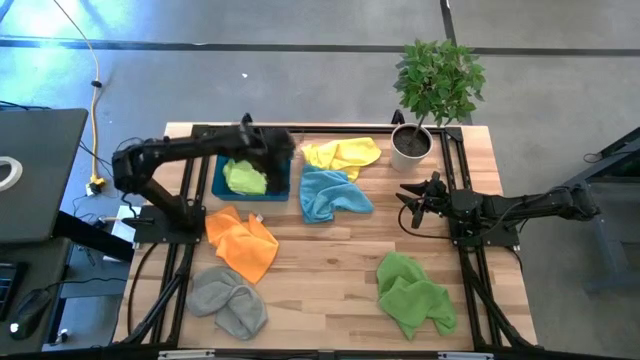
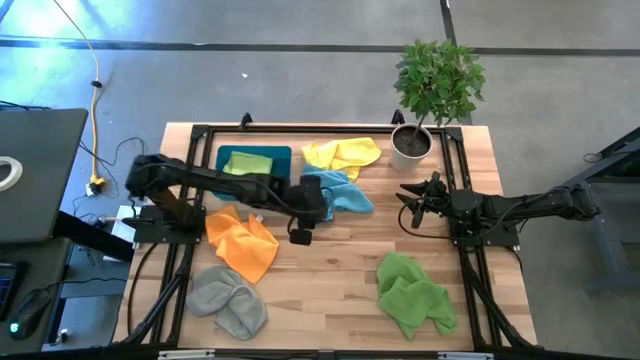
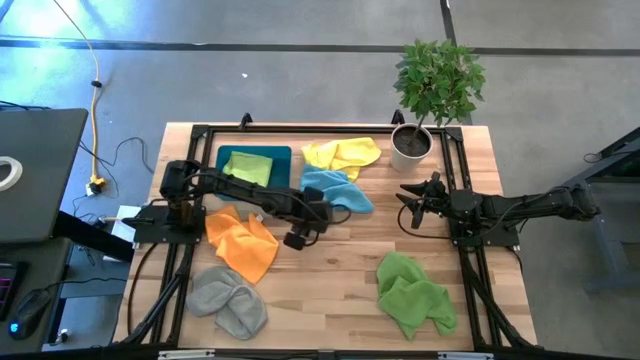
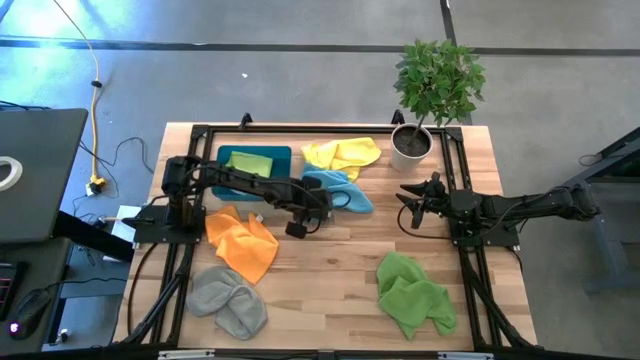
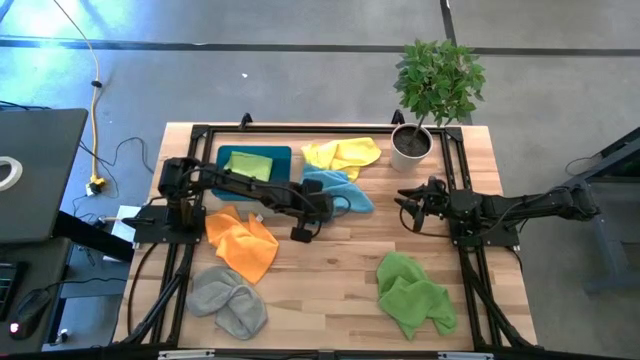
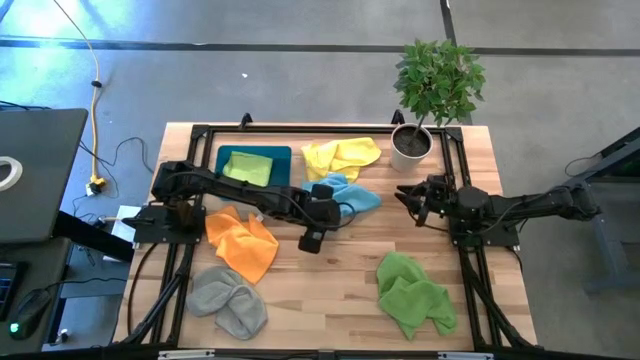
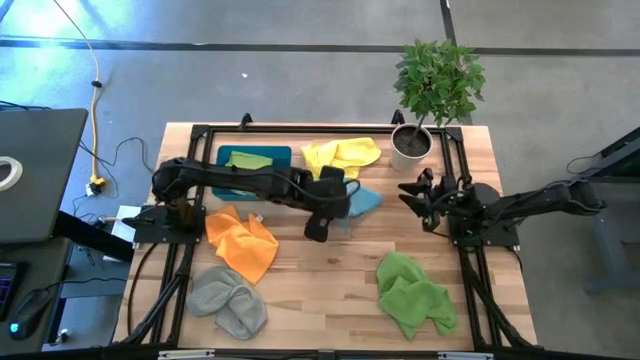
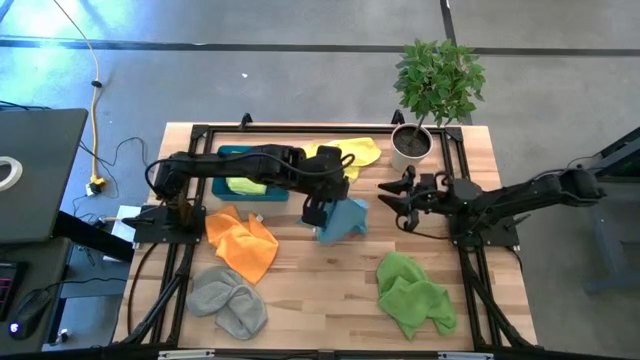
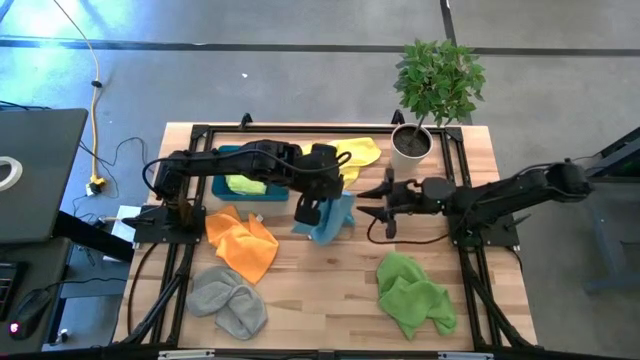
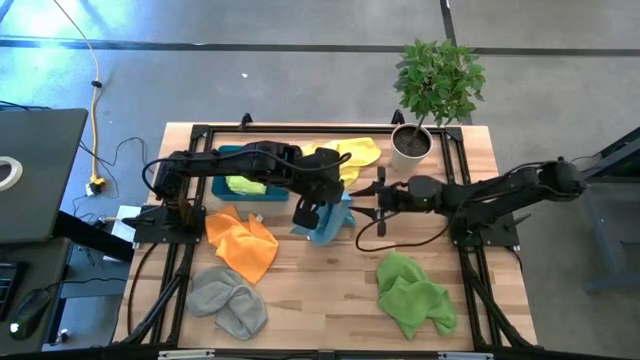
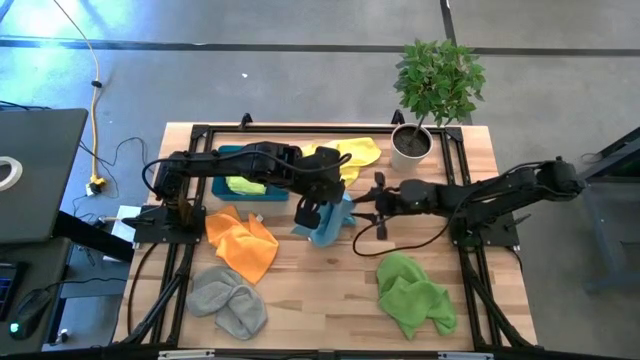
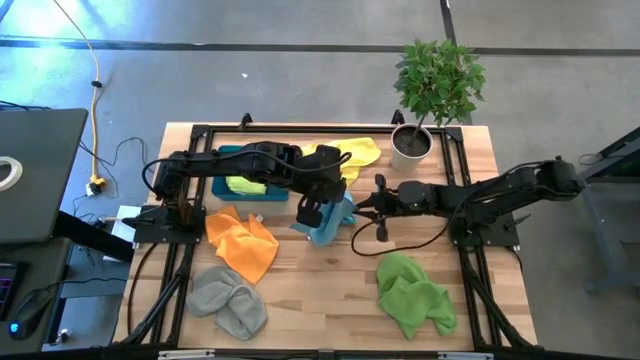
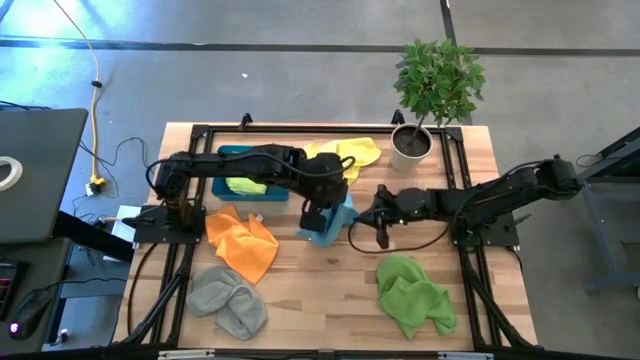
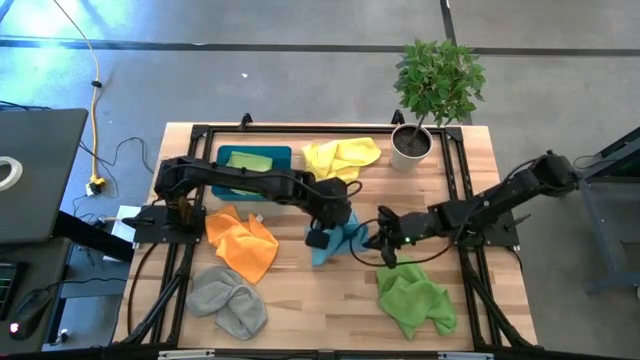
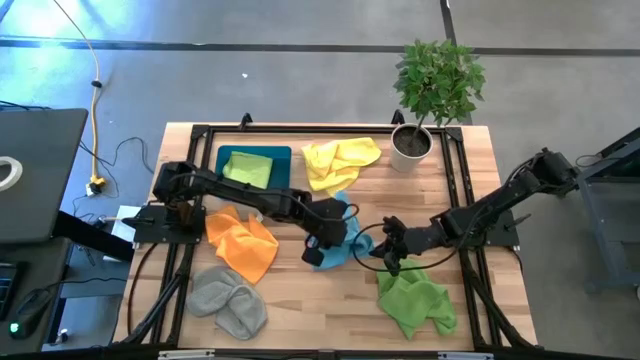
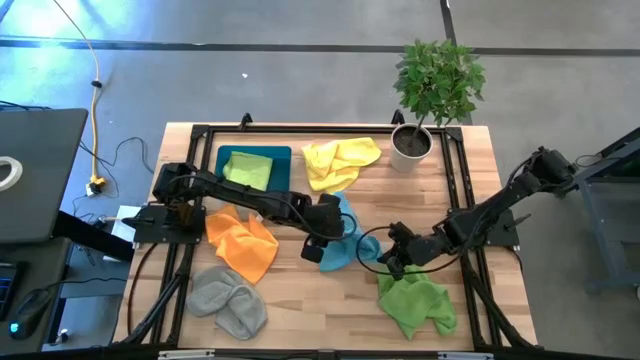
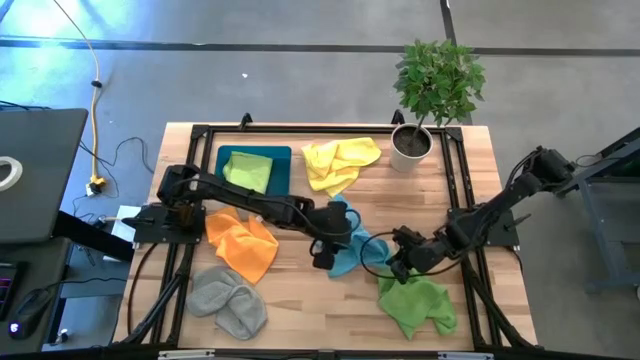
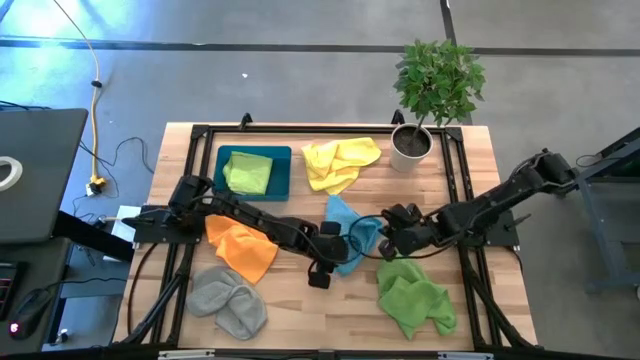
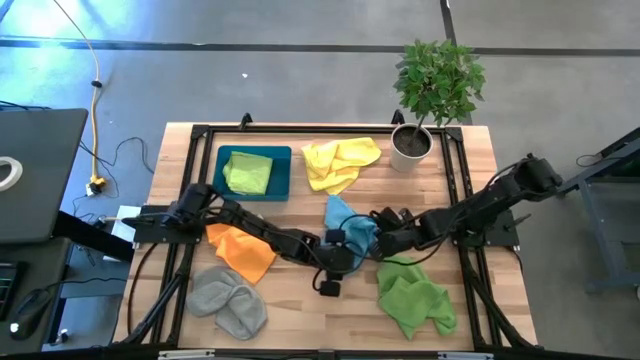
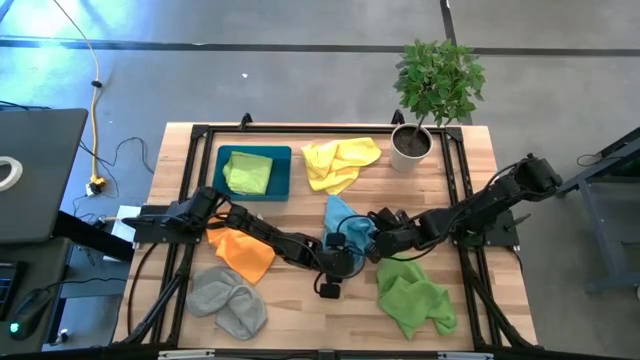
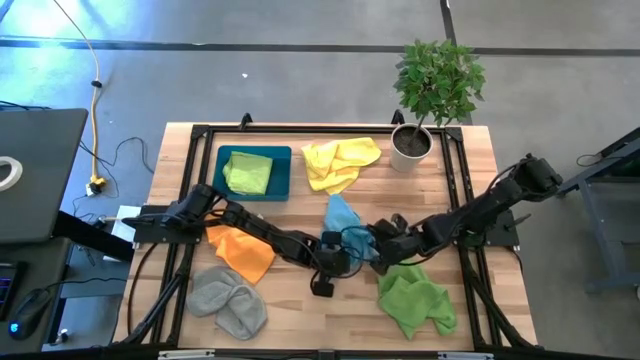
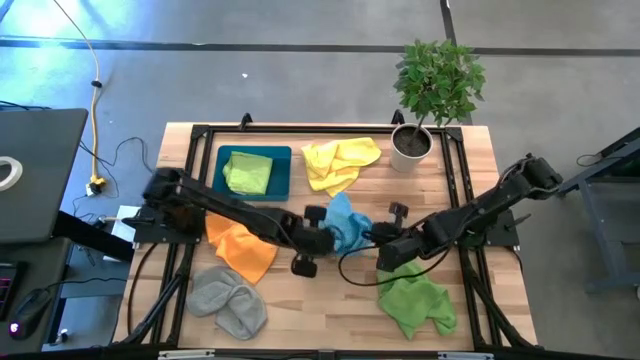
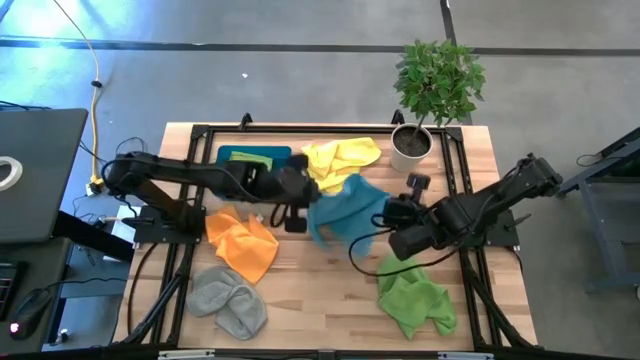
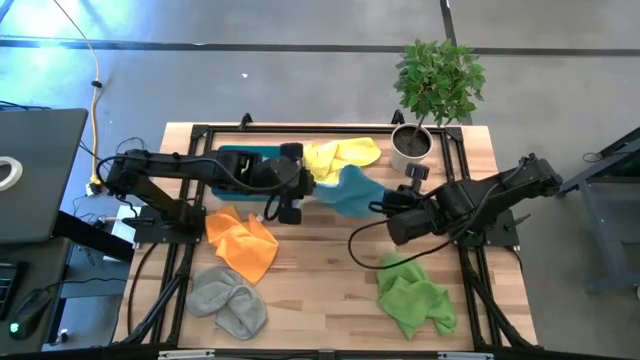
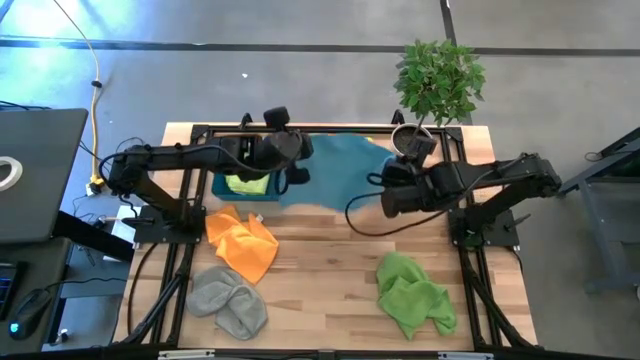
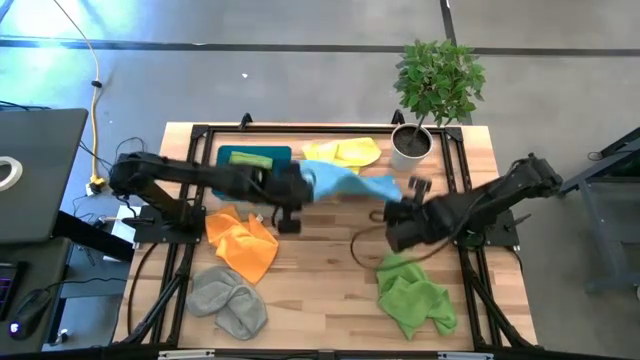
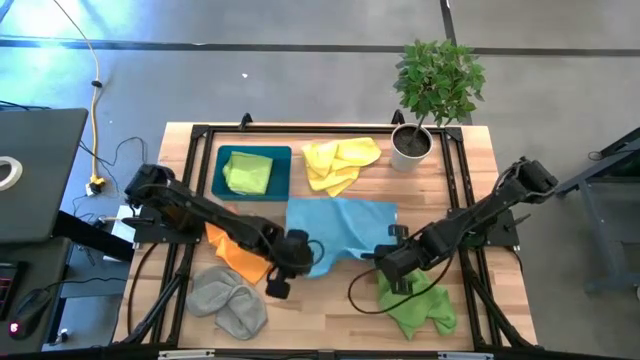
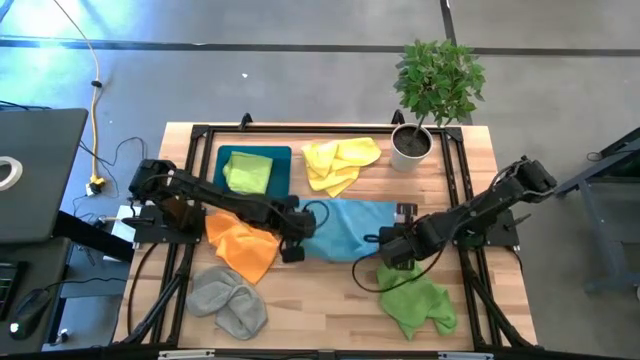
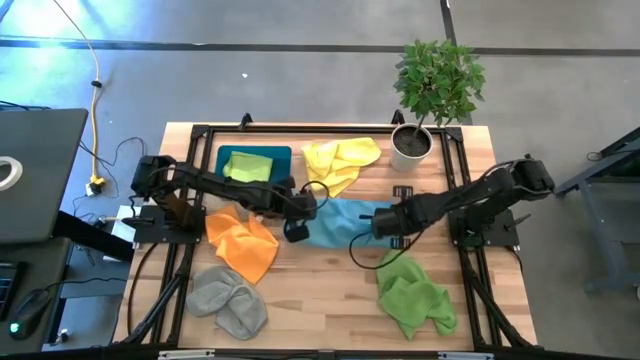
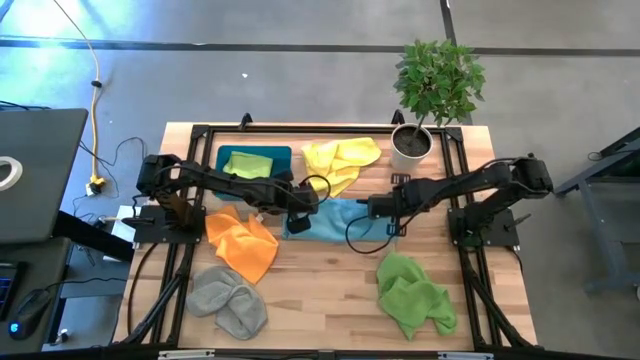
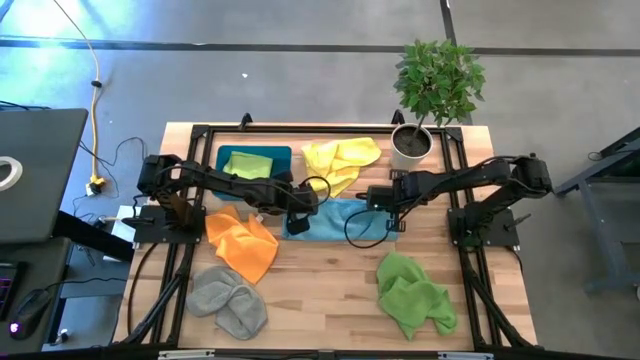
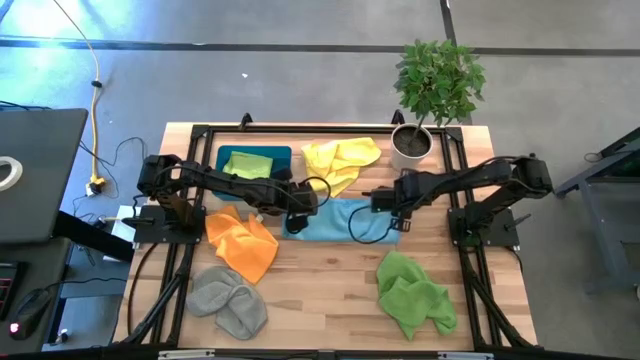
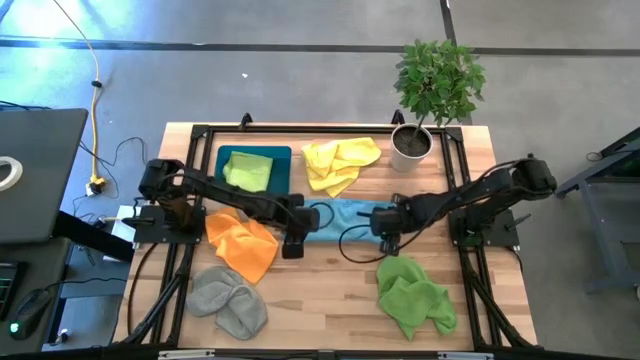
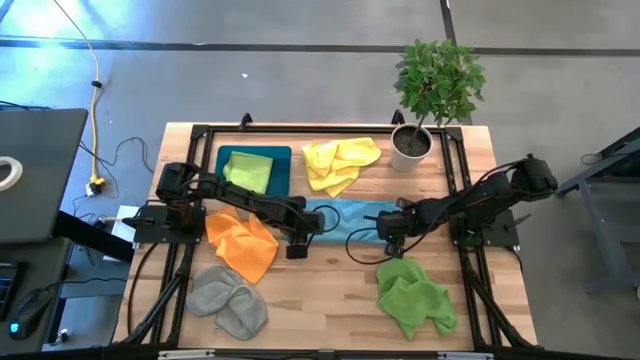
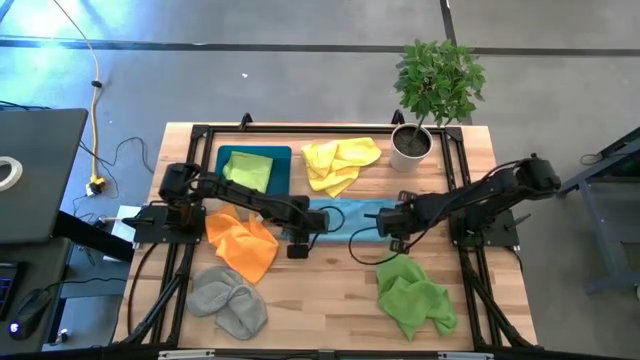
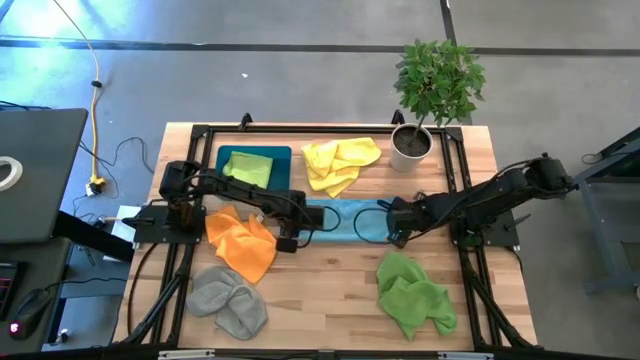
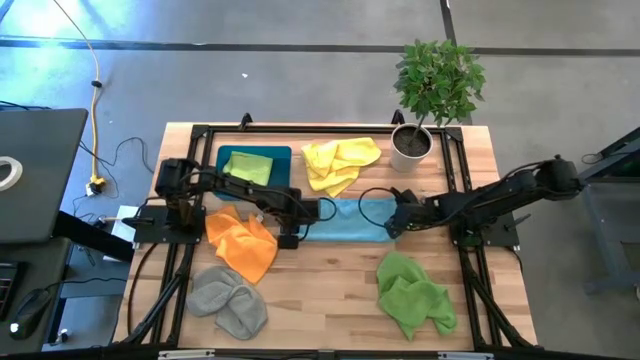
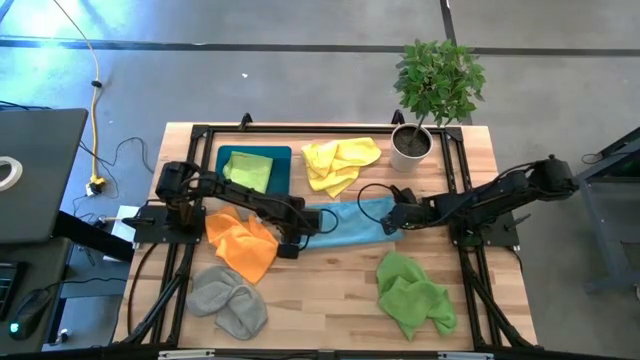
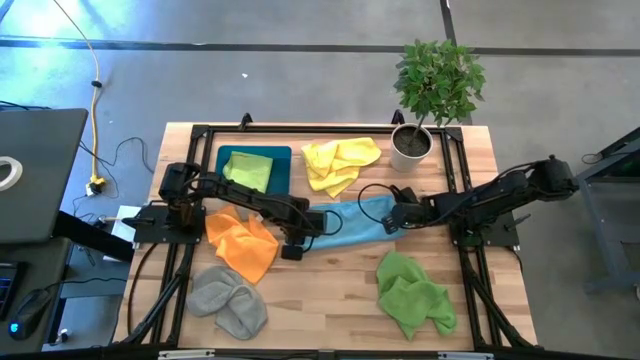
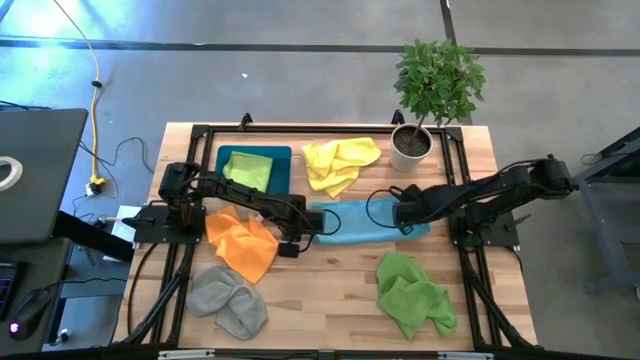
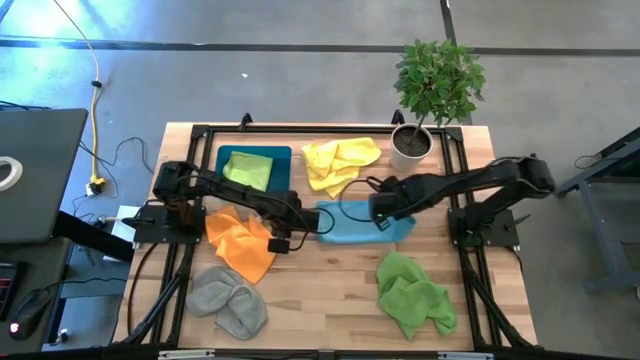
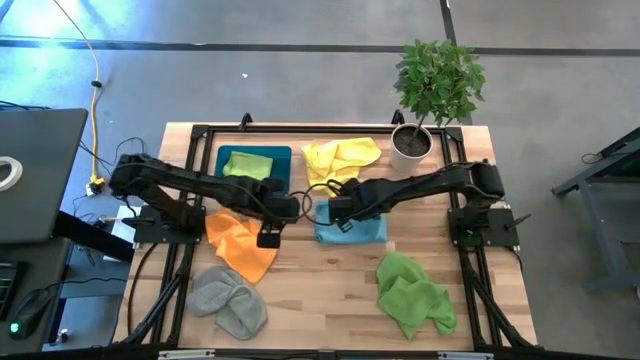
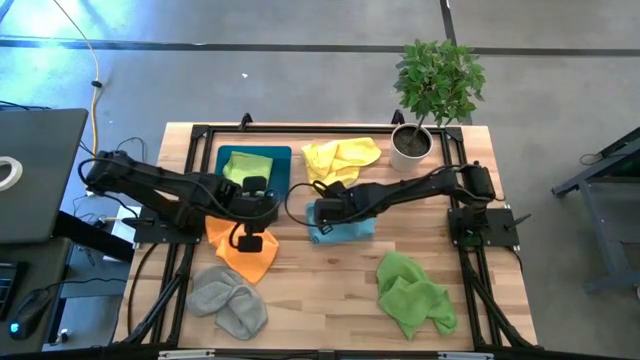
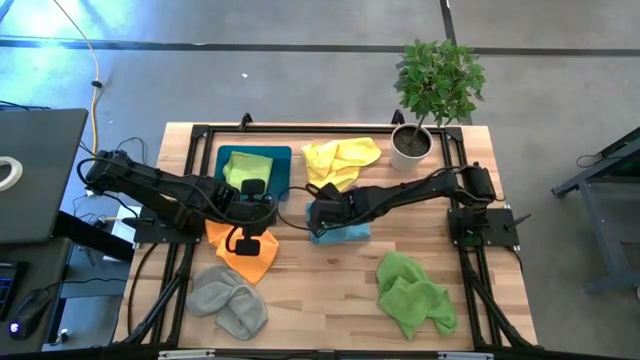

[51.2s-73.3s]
Task: Fold microfiber towels
Fold the blue microfiber cloth
